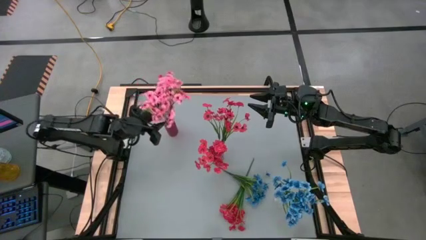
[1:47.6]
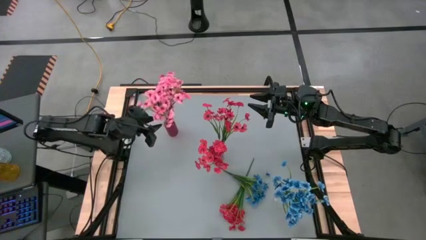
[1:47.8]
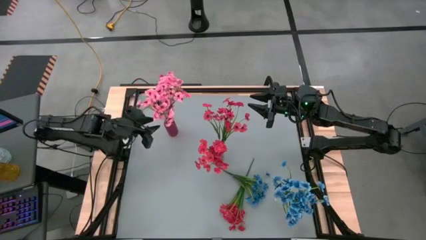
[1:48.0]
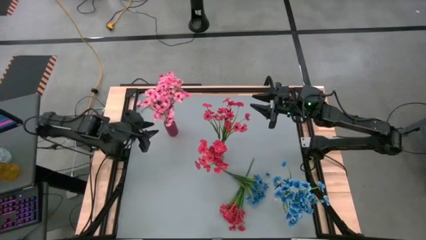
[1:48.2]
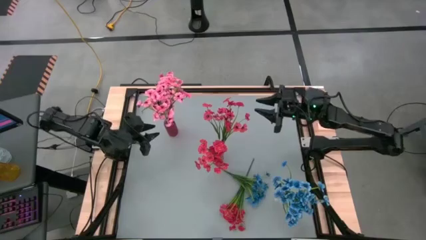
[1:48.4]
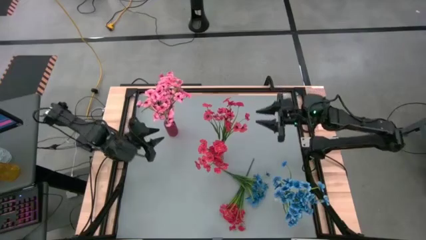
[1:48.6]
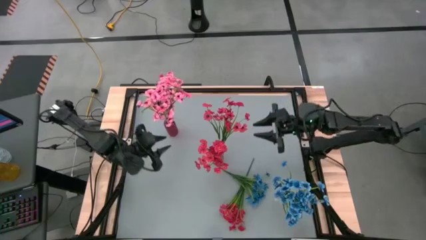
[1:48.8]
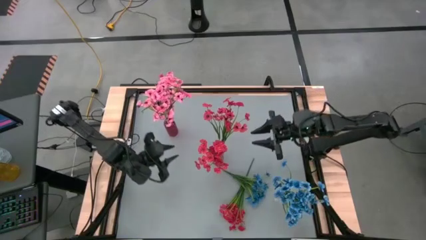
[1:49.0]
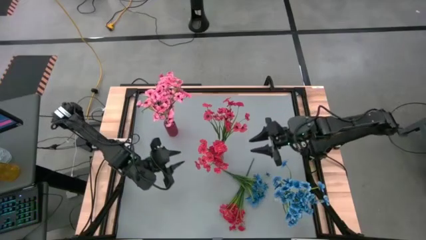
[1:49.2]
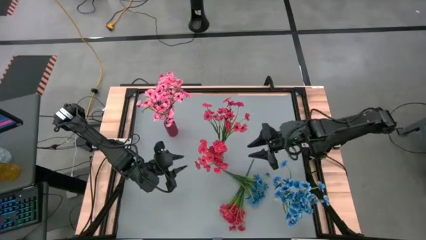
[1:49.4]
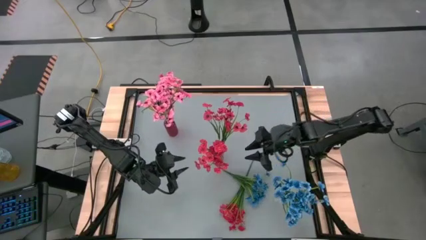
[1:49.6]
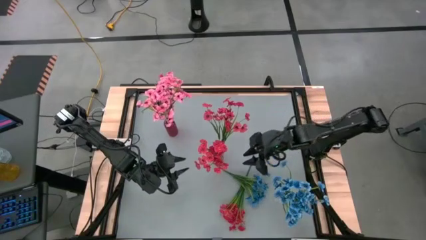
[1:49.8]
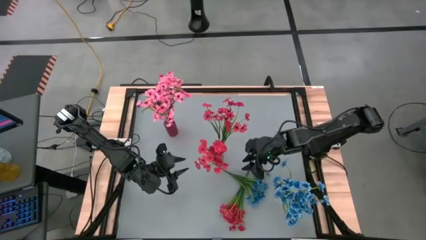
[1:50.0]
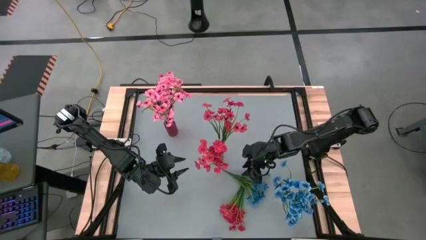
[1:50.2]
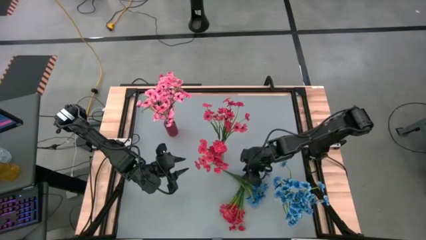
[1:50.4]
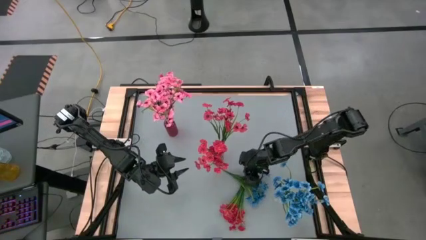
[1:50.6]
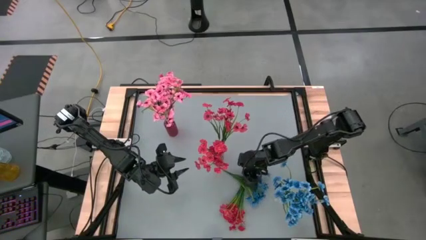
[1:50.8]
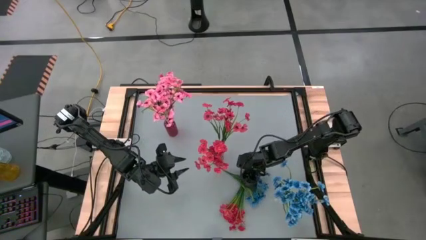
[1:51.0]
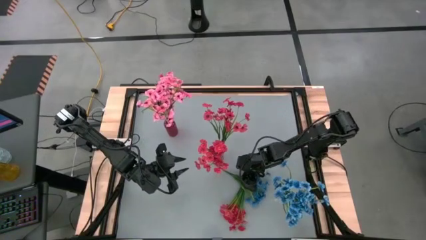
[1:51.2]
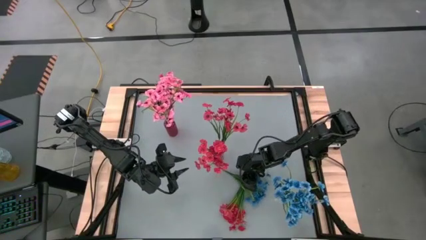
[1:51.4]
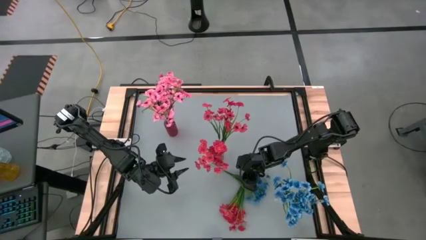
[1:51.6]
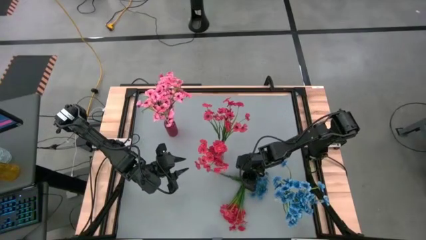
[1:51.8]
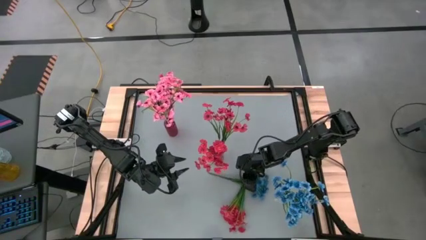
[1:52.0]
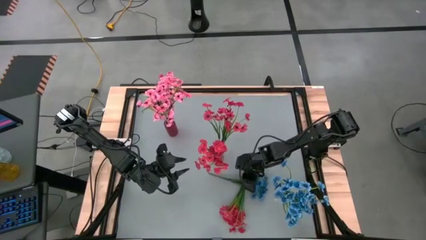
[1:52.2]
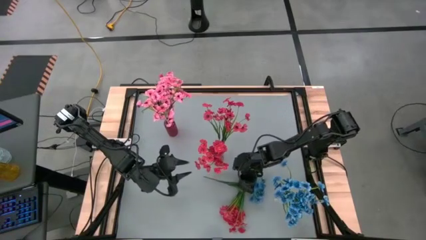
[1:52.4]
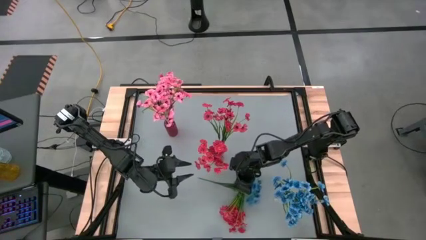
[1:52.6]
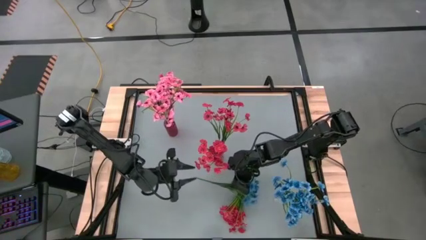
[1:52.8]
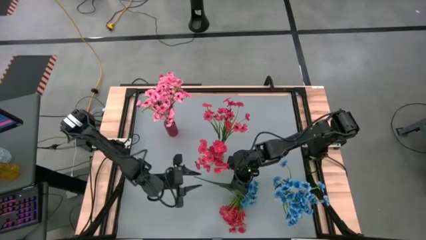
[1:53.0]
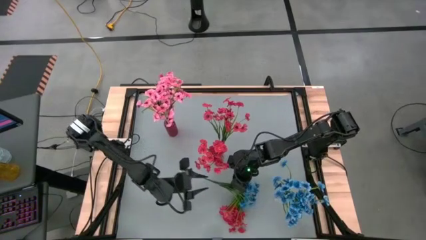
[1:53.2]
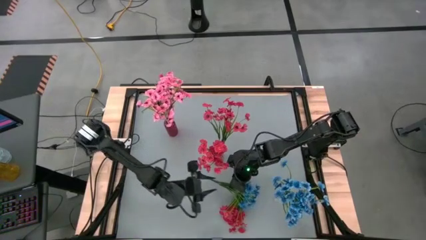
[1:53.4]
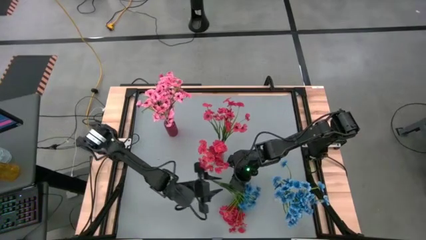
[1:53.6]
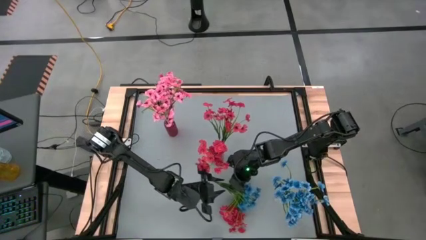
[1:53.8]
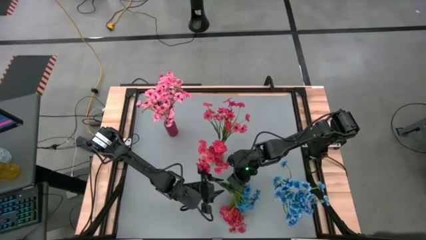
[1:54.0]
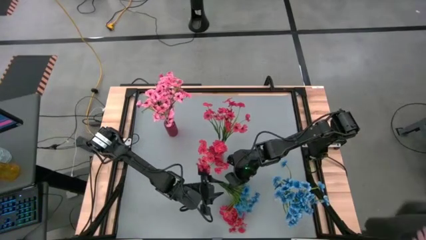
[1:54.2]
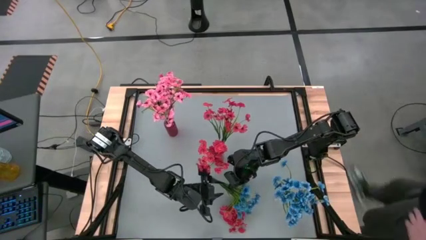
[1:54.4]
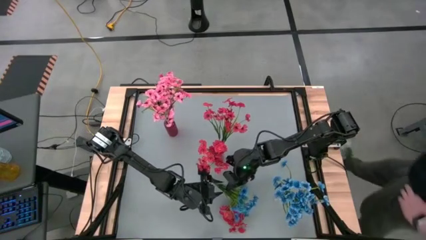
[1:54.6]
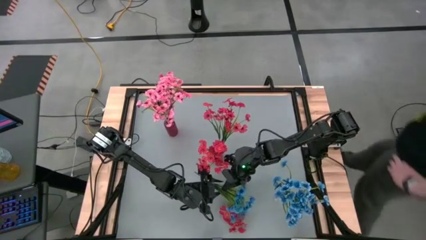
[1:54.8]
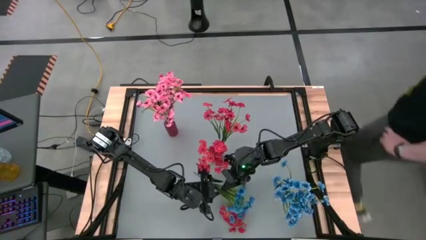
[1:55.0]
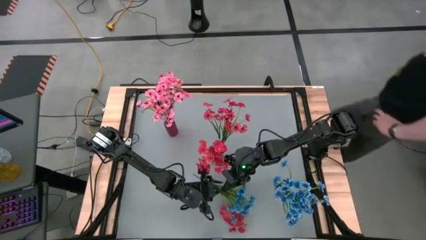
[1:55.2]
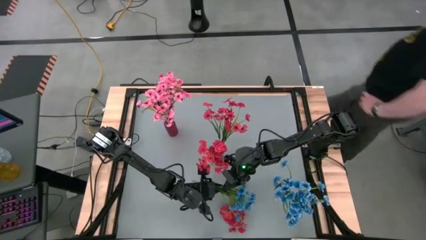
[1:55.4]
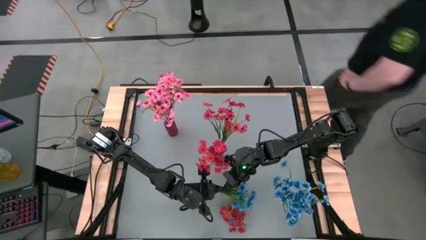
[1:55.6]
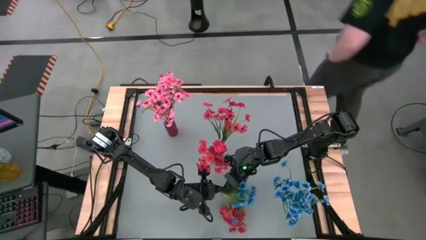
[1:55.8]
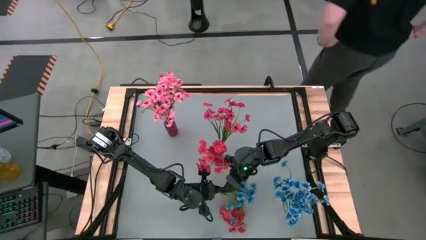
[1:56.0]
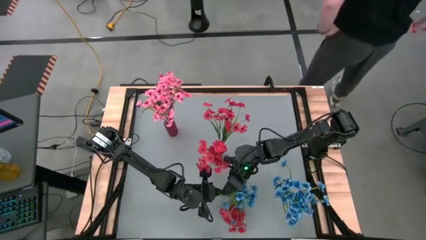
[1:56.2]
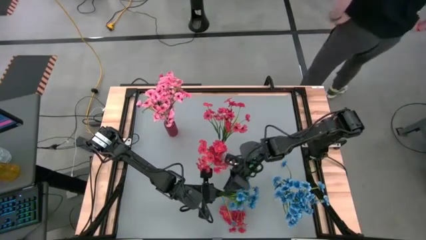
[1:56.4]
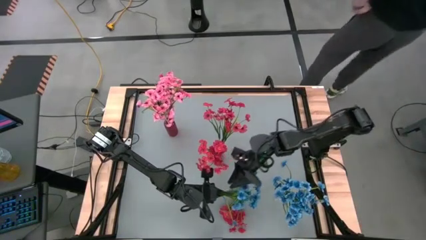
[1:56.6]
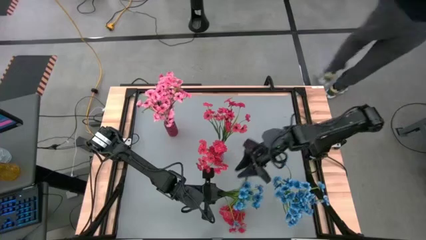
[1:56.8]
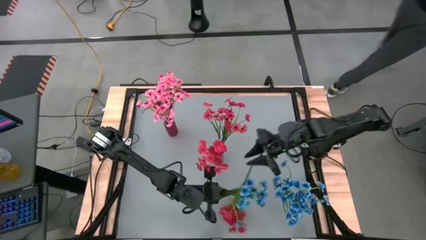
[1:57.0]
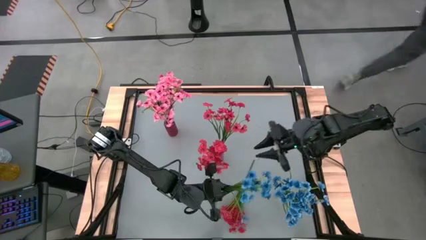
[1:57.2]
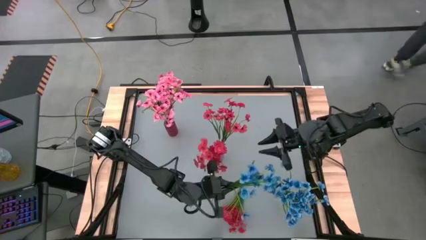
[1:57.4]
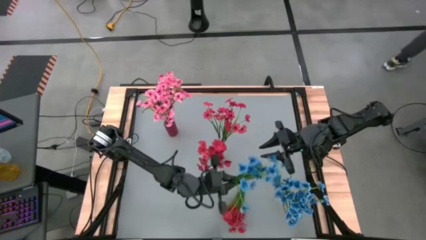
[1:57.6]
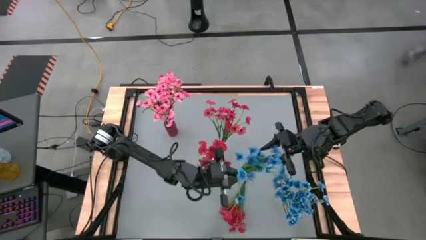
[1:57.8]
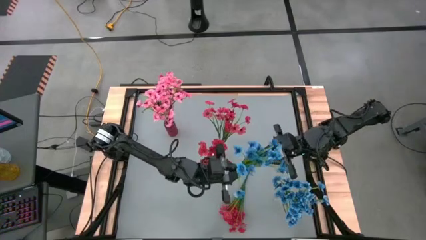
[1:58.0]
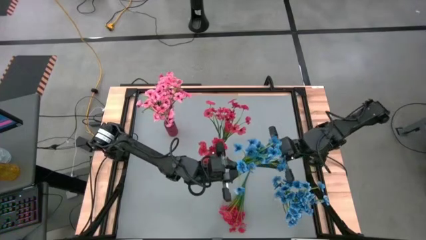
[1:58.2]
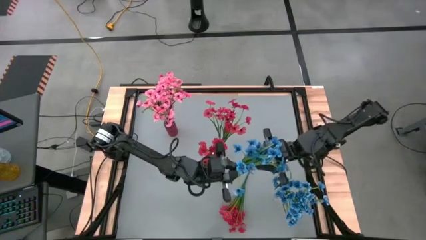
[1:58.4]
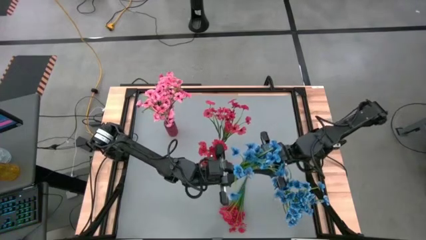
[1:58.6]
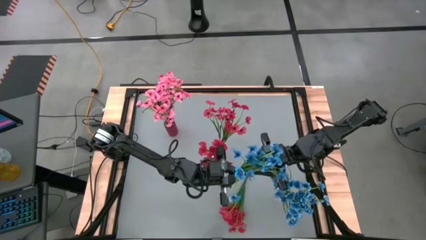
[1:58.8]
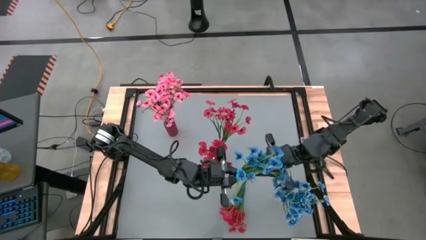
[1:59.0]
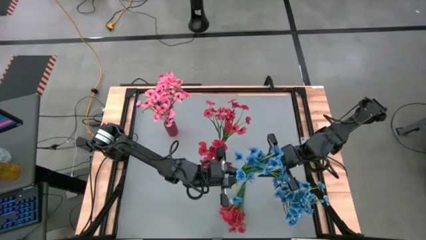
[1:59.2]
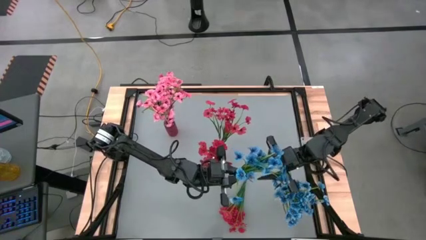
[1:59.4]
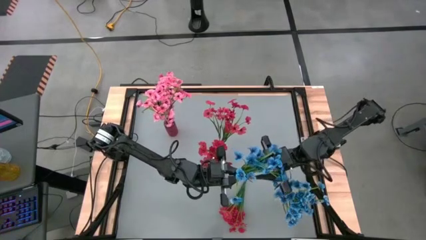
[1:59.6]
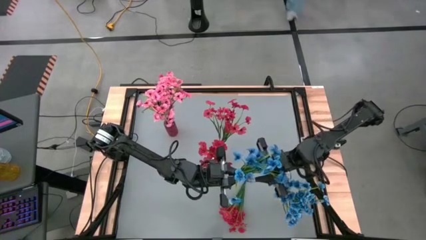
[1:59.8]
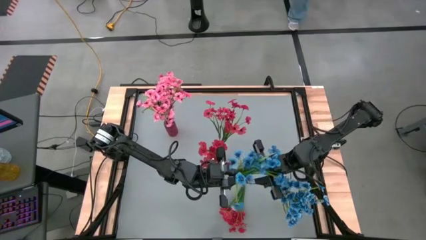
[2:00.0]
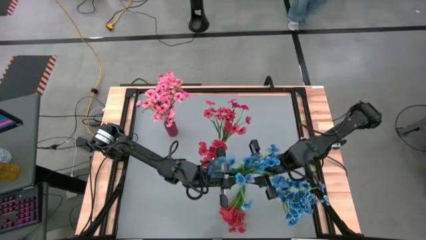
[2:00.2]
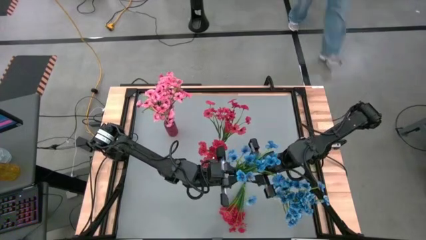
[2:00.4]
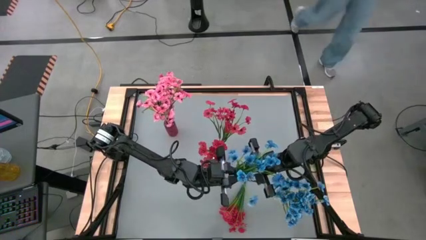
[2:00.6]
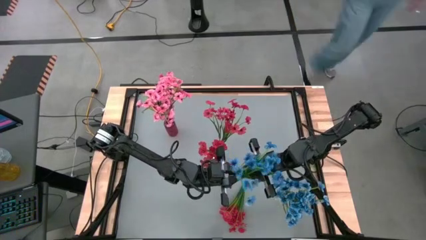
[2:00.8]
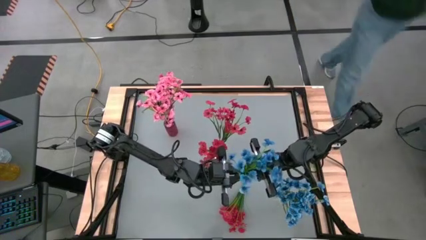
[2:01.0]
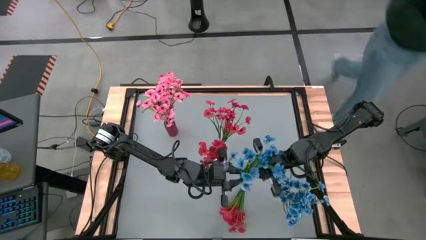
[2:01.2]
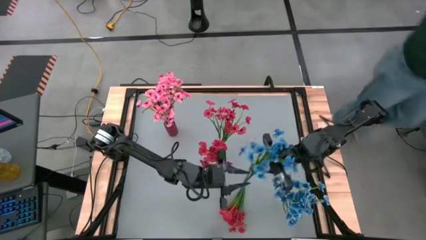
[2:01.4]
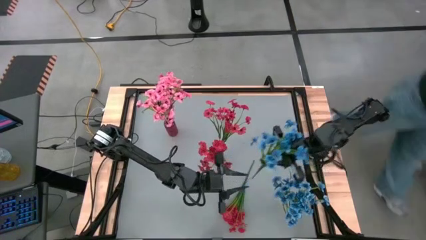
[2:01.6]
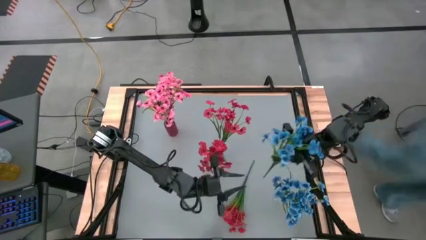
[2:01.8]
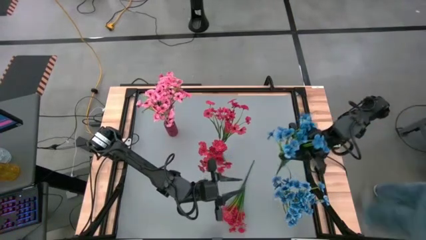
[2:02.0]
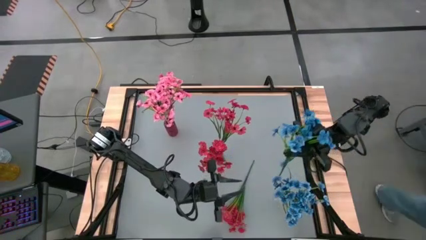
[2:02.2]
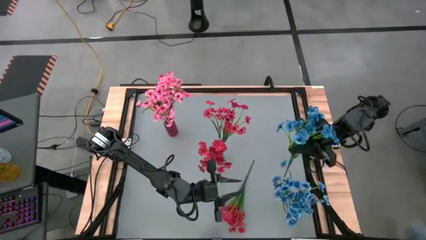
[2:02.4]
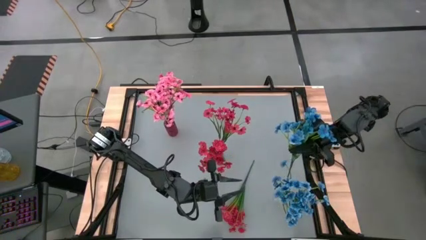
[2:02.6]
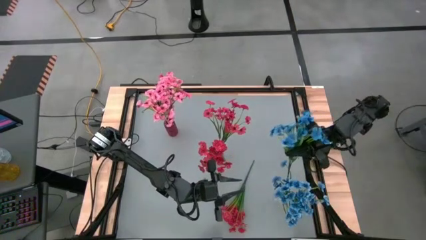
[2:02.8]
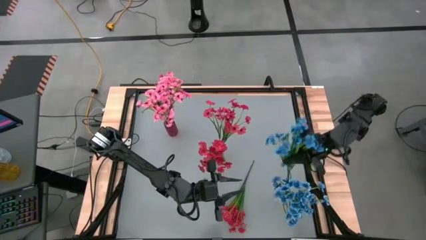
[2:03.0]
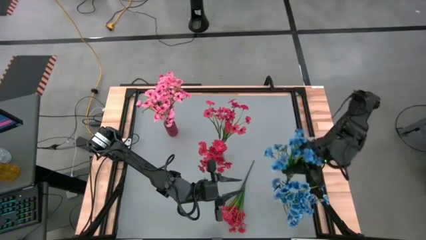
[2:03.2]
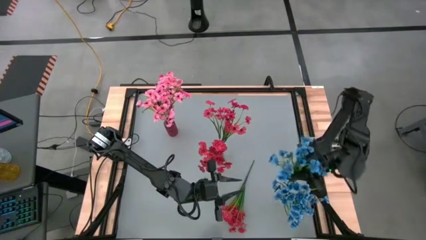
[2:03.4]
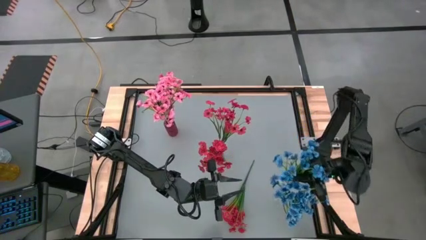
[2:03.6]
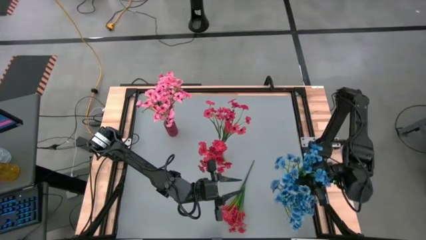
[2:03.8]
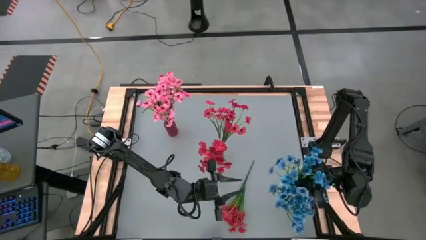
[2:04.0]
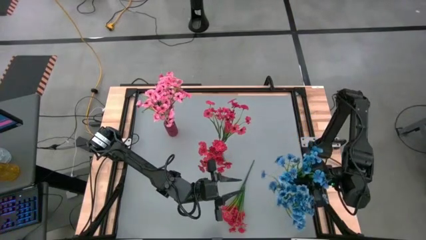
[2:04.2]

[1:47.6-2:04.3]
Task: Sort flowers into vase by color
Put the blue flowers into the transparent vase
